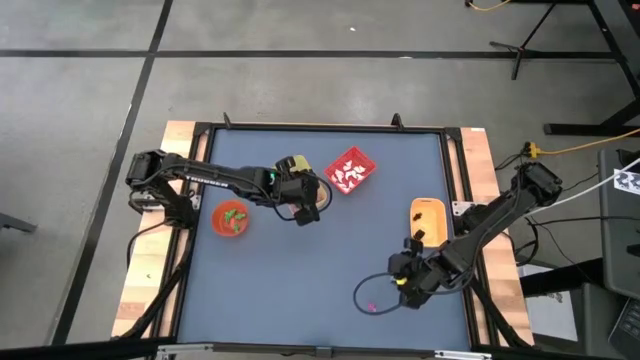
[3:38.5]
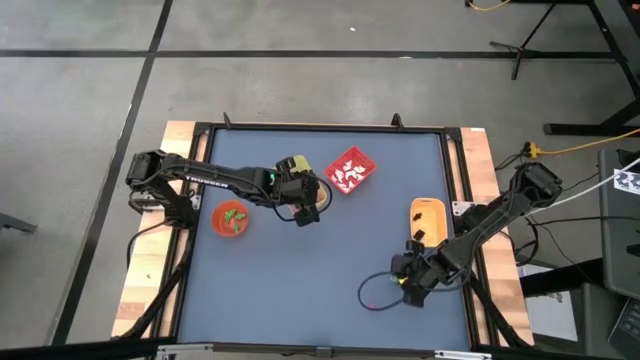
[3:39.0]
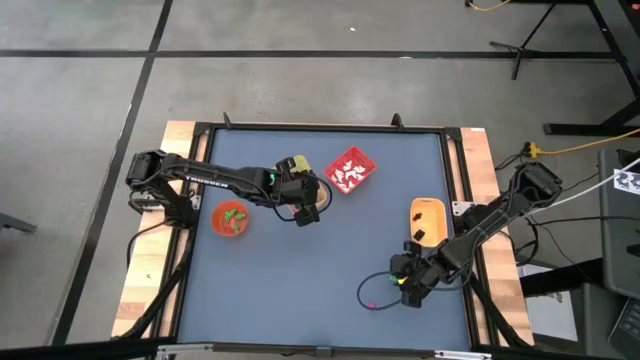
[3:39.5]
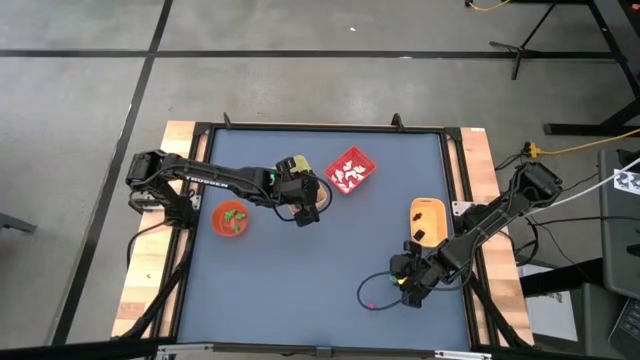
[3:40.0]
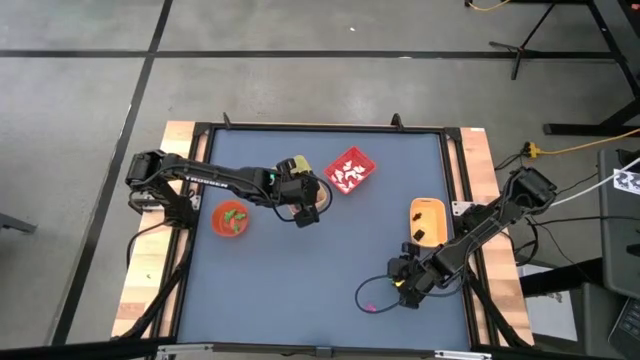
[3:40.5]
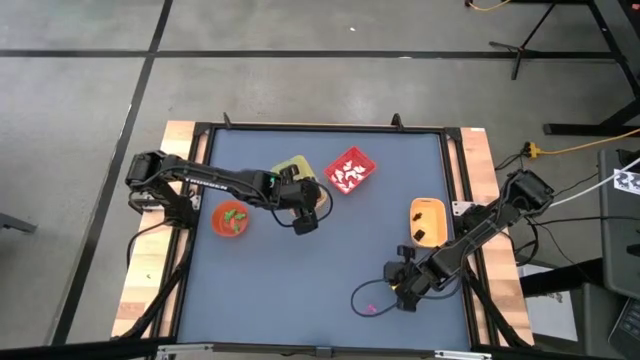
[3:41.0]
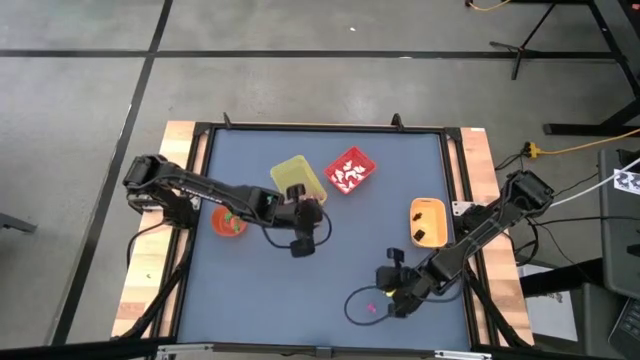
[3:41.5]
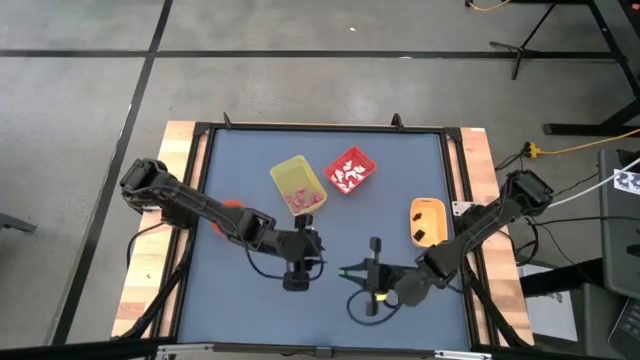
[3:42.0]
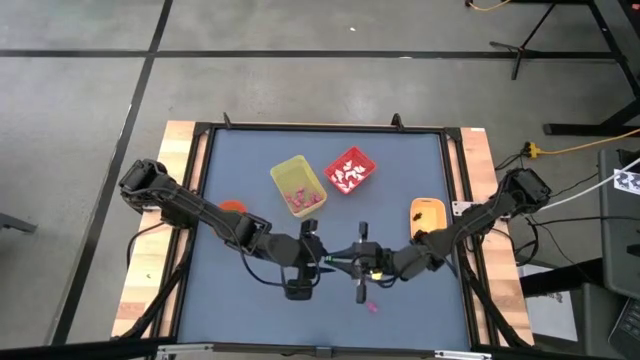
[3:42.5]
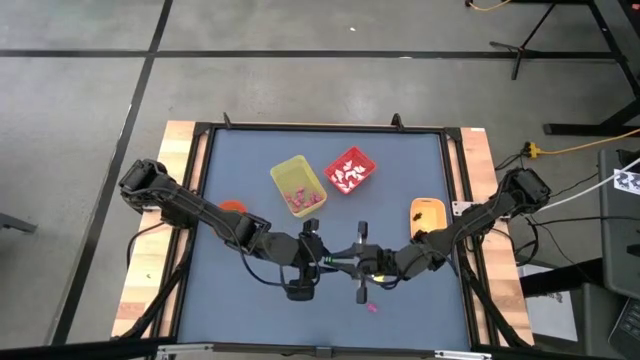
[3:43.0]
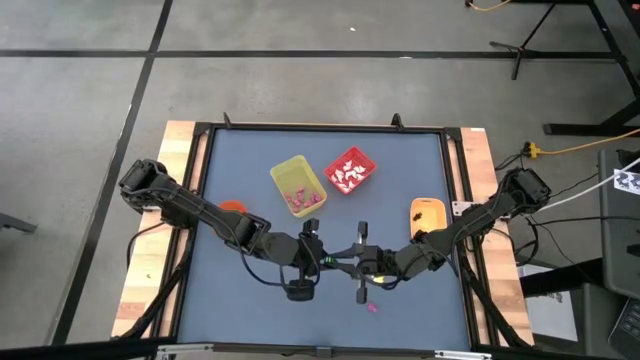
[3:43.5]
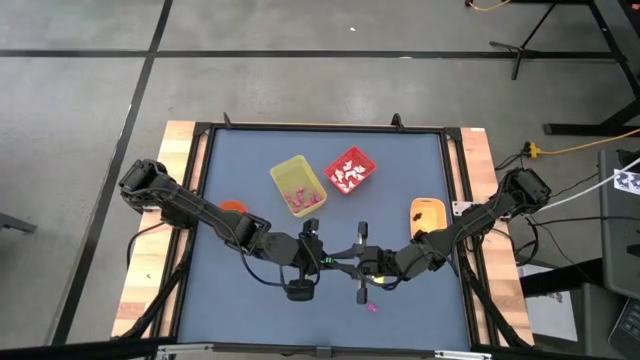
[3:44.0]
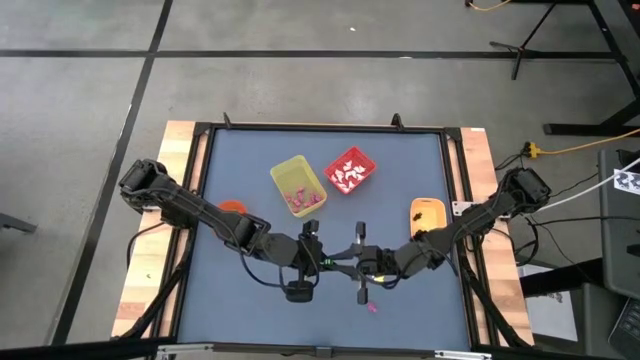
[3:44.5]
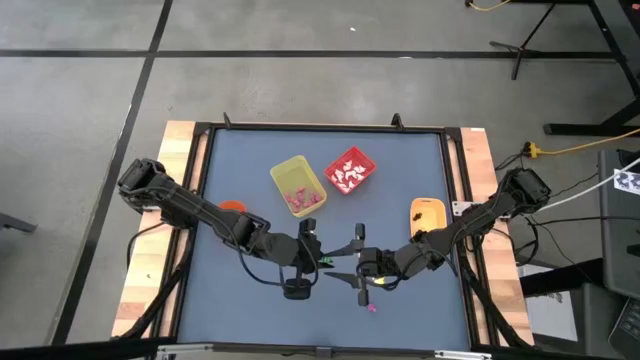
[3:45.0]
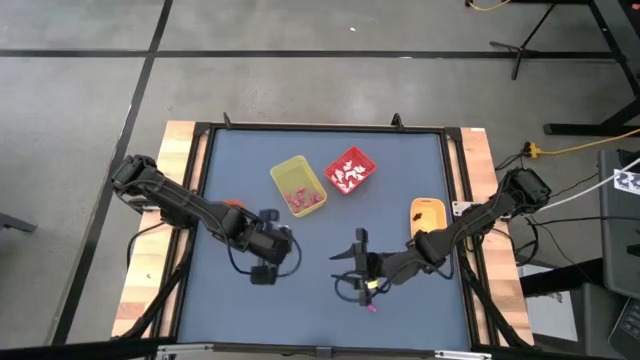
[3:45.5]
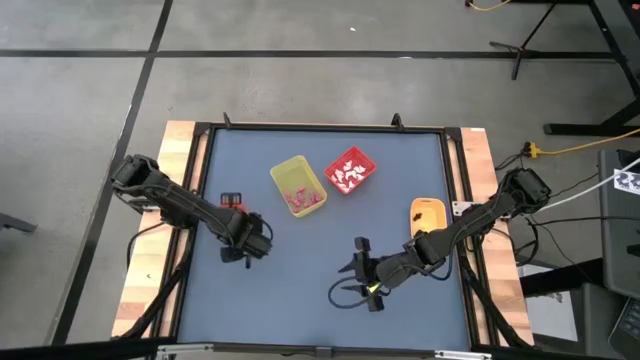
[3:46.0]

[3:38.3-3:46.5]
Task: Sort Halloween decoration
Put the green skeleton toy into the orange bin

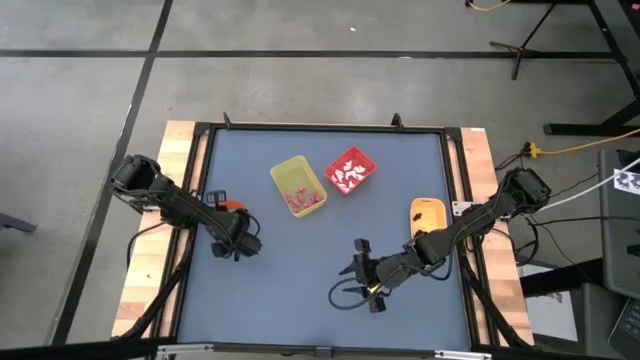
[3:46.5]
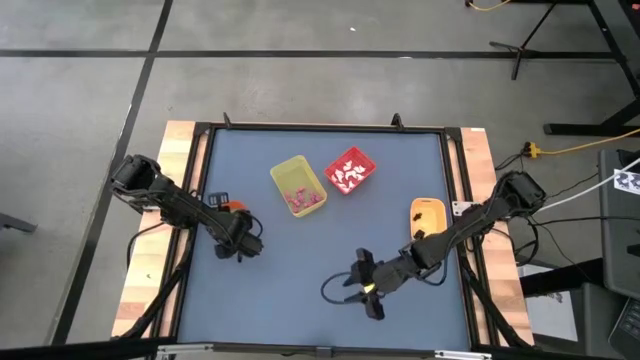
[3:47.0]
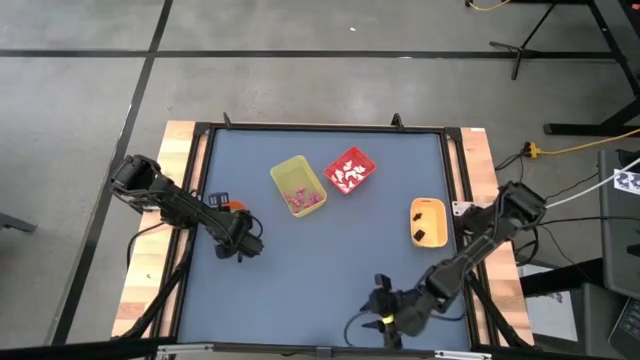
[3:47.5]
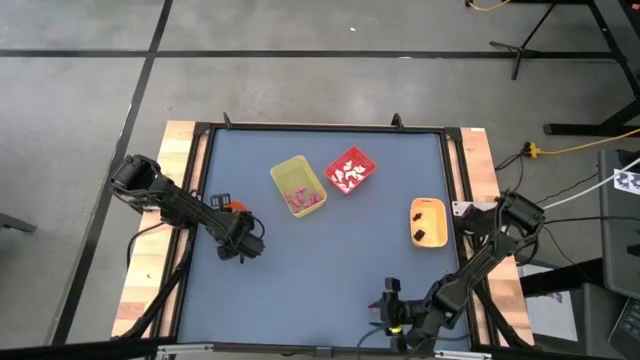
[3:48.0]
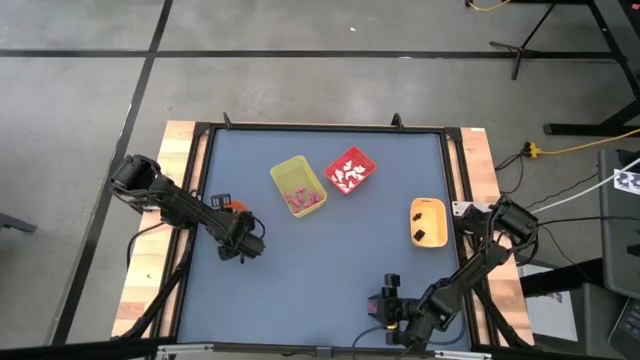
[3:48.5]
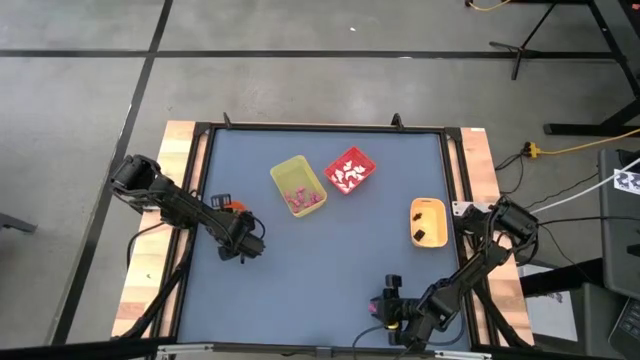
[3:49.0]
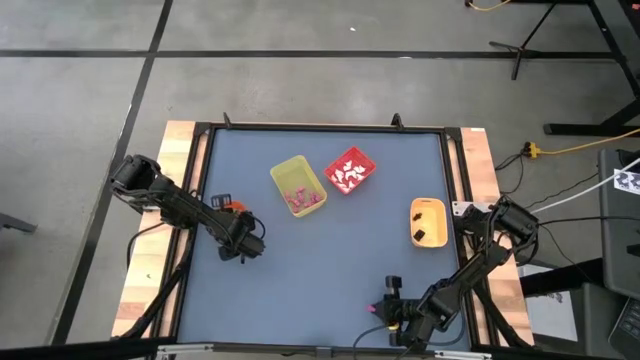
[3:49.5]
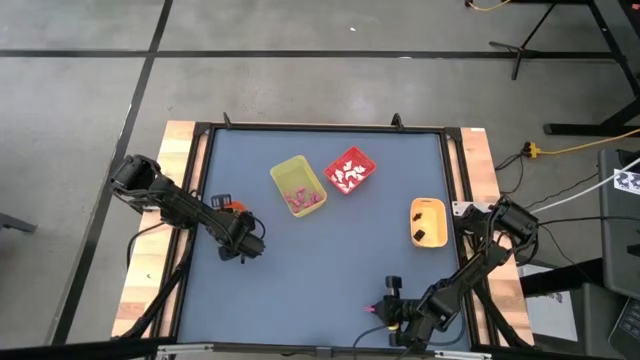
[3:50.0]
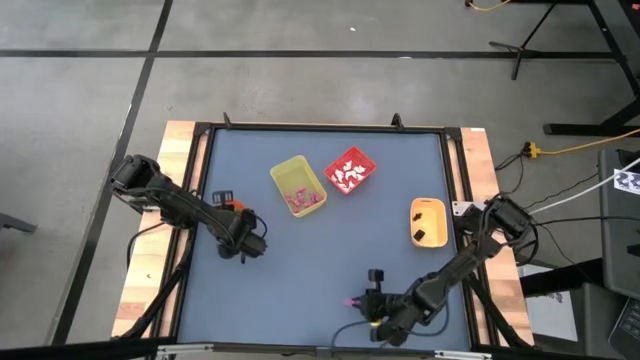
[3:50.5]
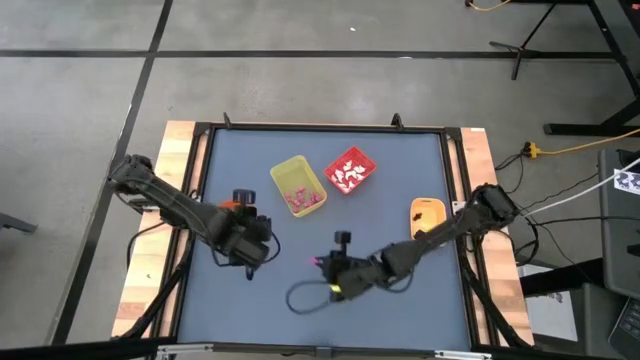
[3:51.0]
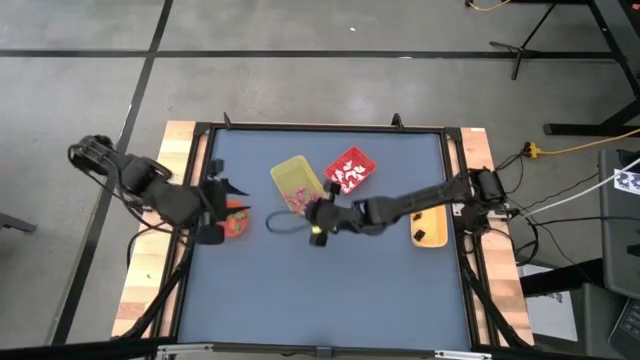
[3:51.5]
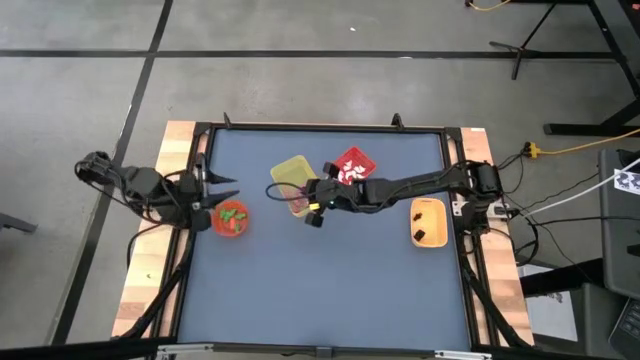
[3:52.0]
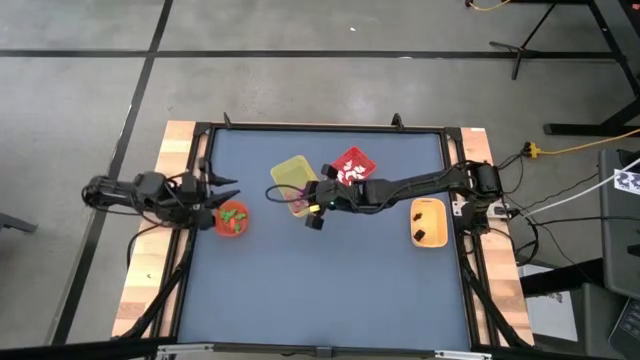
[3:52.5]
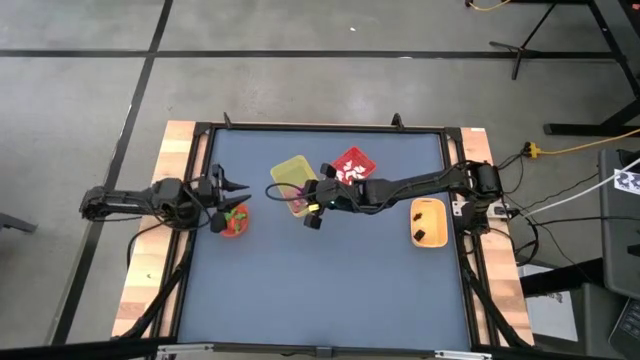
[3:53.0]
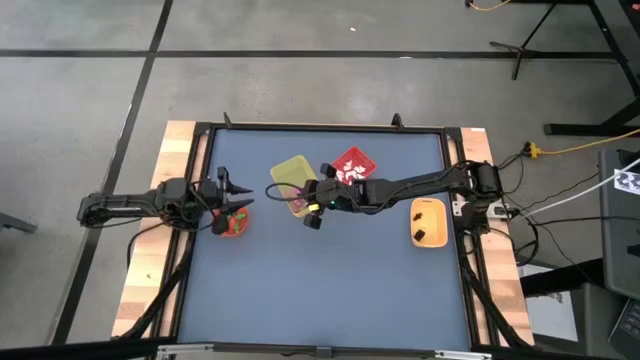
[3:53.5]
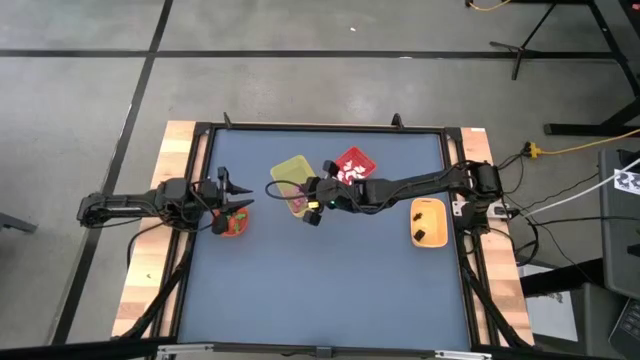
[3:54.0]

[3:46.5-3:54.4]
Put the pink skeleton toy into the yellow bin

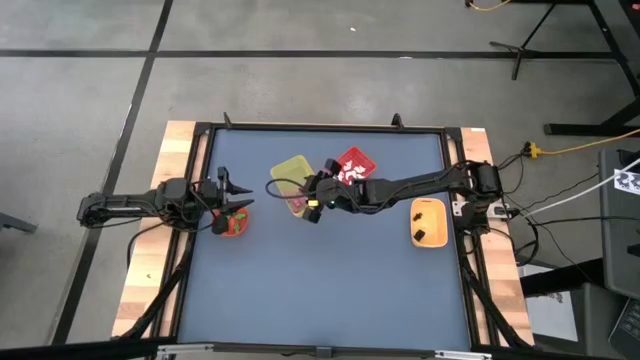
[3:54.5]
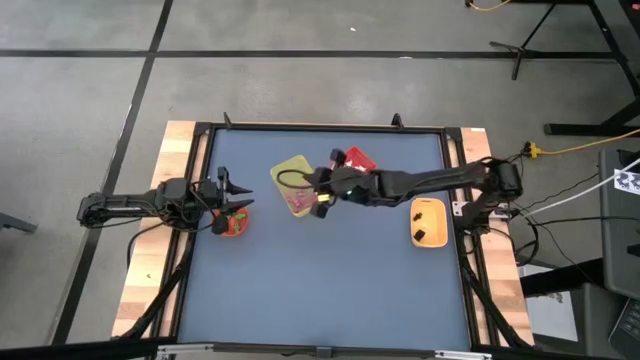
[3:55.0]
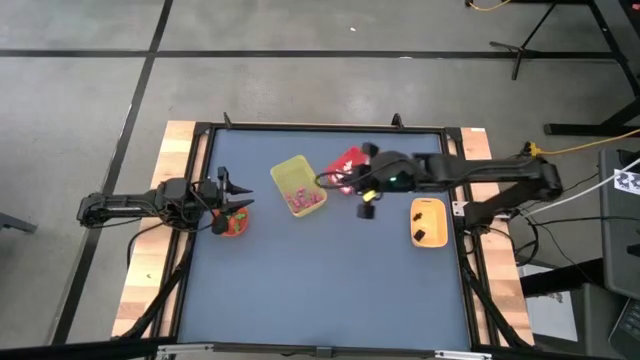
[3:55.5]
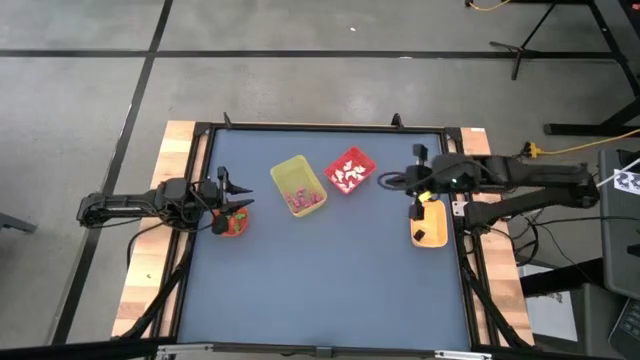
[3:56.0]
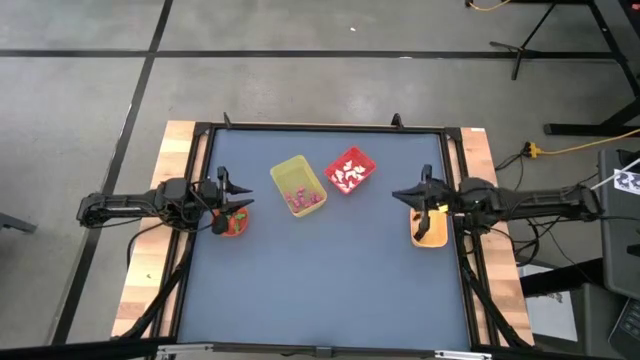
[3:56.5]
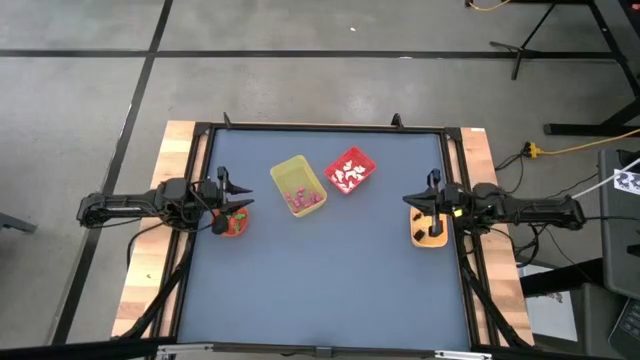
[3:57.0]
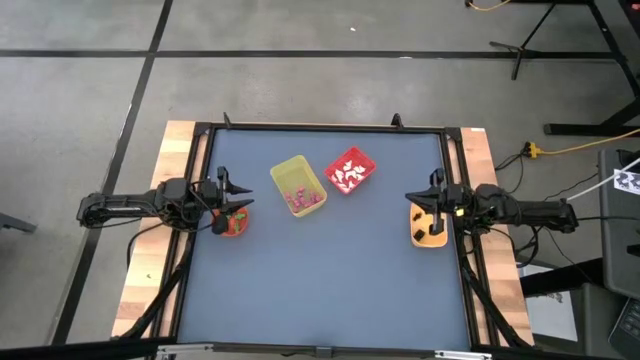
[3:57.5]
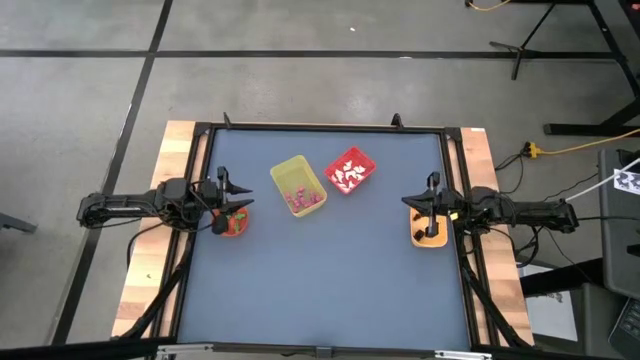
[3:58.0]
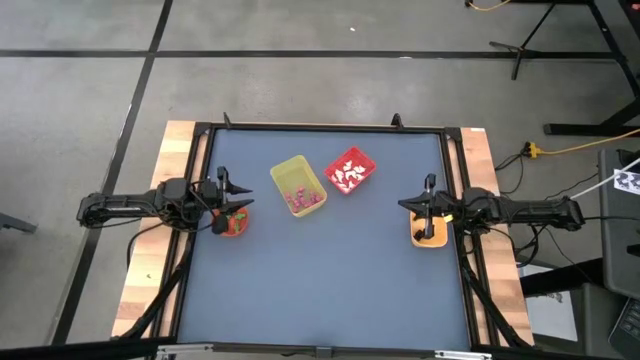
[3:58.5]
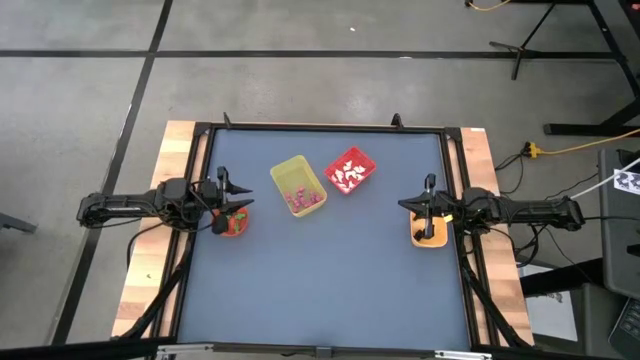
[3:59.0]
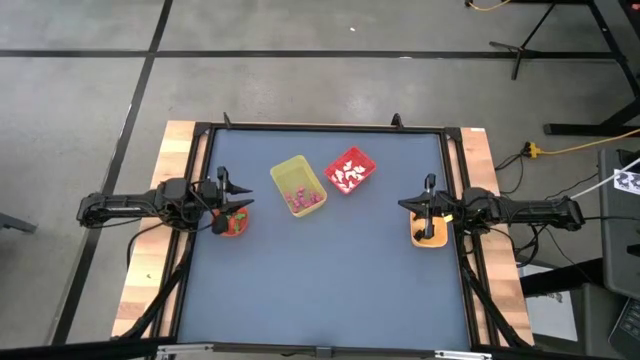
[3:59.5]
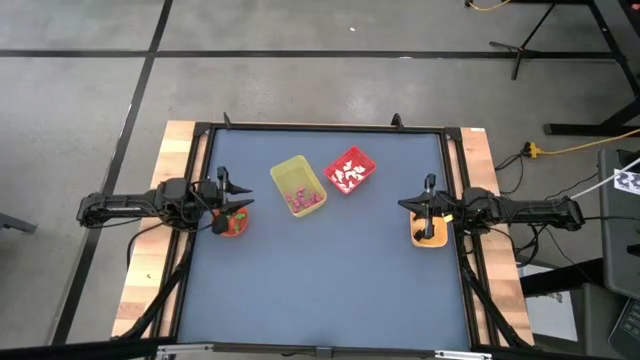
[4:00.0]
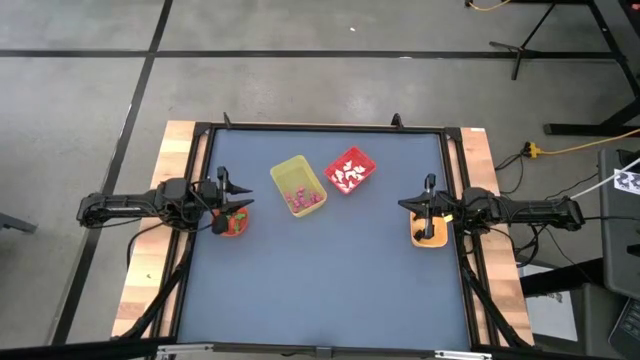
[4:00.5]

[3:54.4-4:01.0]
Return to Home Position
